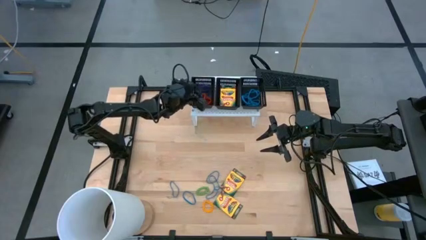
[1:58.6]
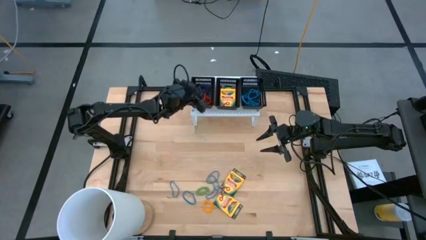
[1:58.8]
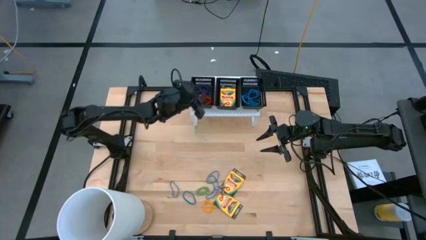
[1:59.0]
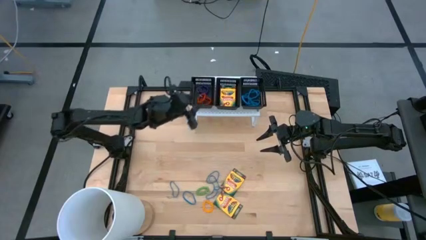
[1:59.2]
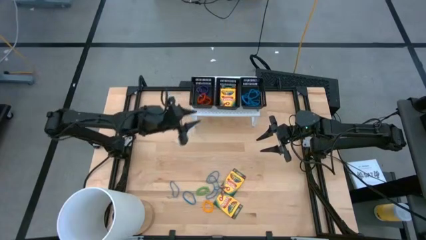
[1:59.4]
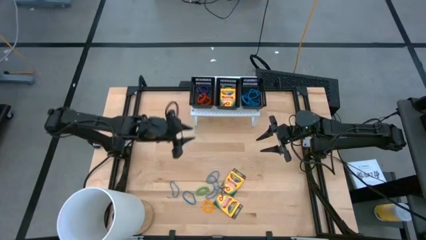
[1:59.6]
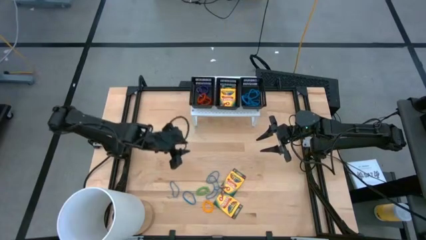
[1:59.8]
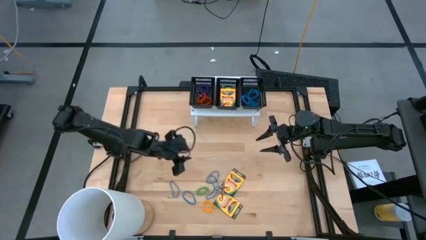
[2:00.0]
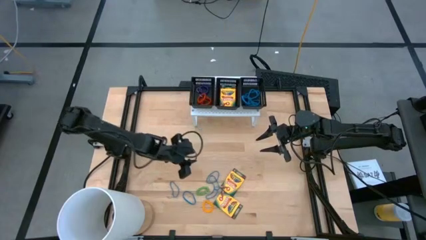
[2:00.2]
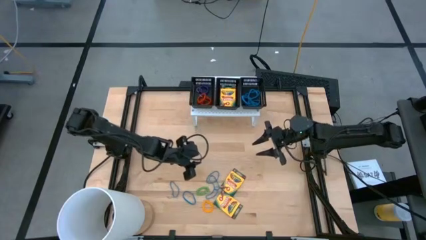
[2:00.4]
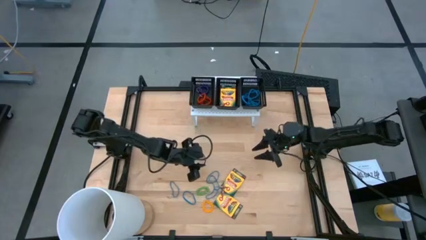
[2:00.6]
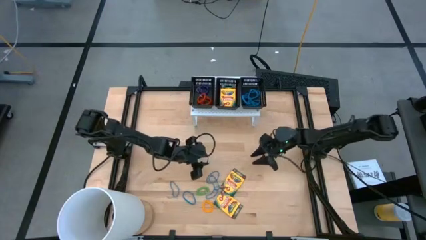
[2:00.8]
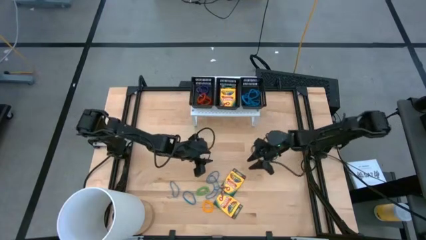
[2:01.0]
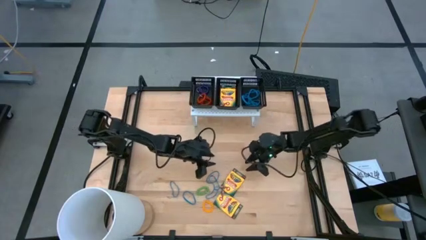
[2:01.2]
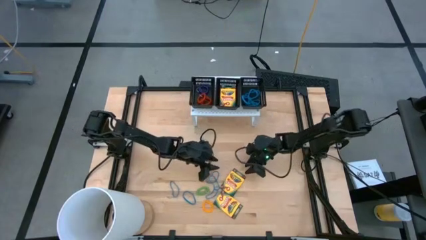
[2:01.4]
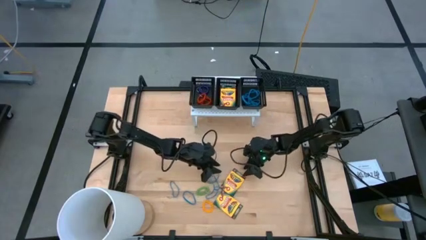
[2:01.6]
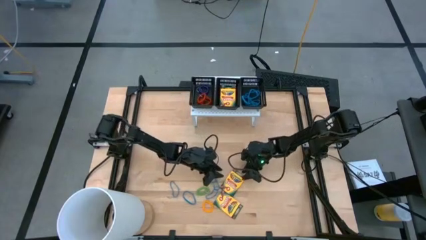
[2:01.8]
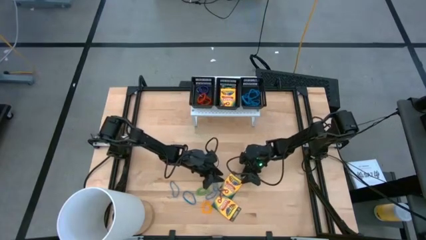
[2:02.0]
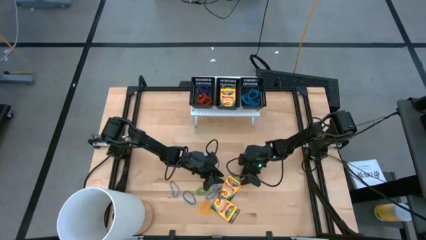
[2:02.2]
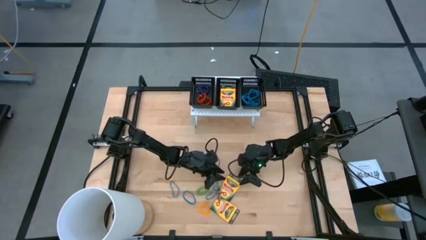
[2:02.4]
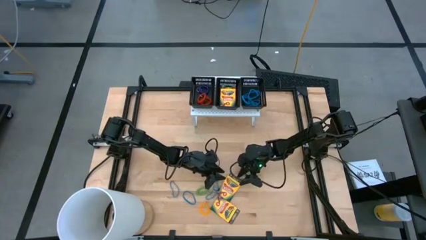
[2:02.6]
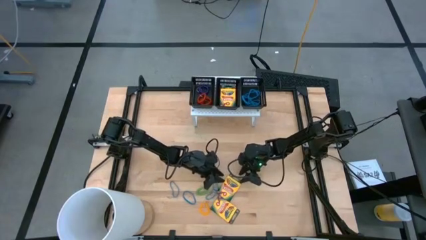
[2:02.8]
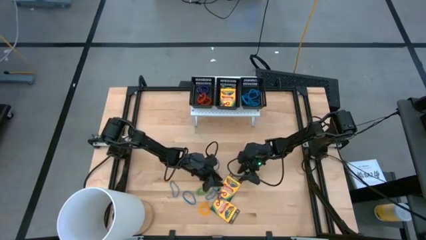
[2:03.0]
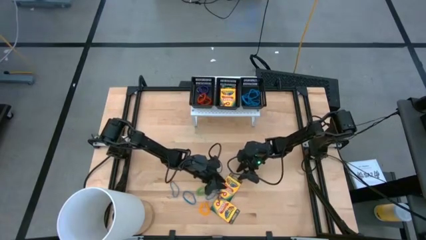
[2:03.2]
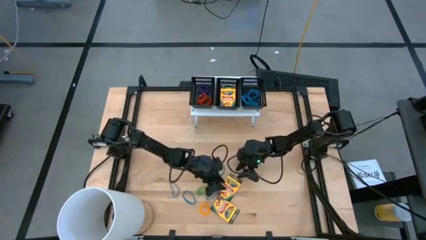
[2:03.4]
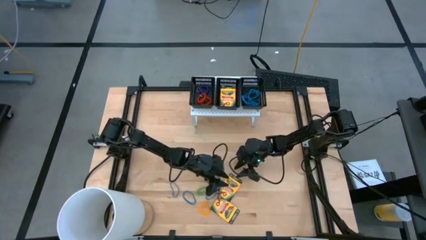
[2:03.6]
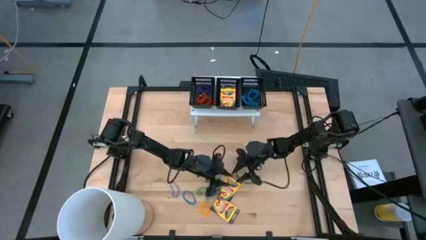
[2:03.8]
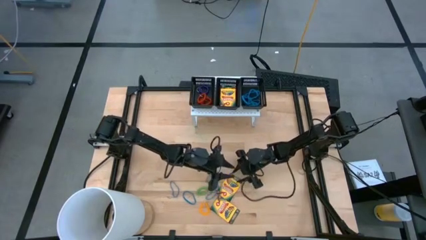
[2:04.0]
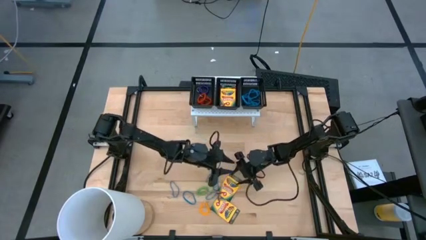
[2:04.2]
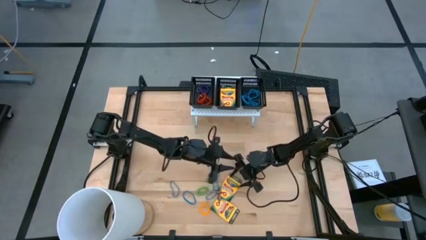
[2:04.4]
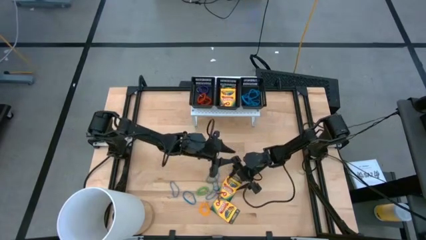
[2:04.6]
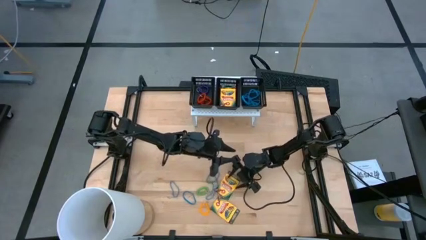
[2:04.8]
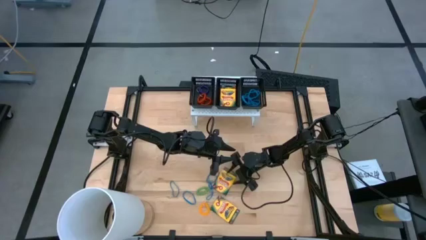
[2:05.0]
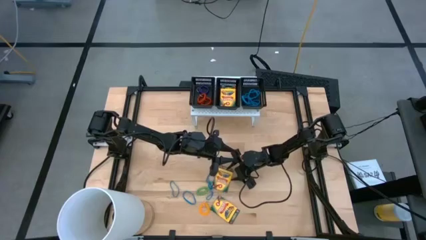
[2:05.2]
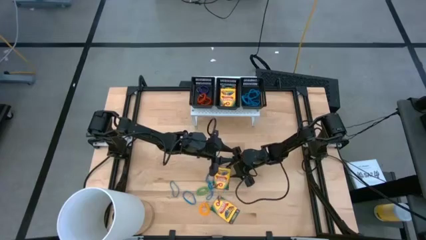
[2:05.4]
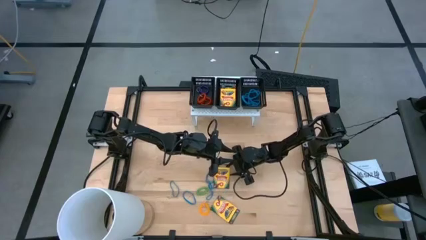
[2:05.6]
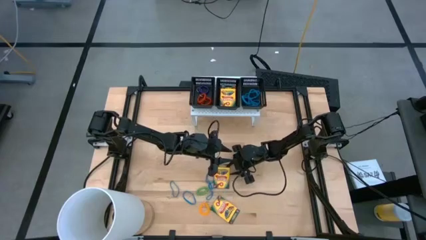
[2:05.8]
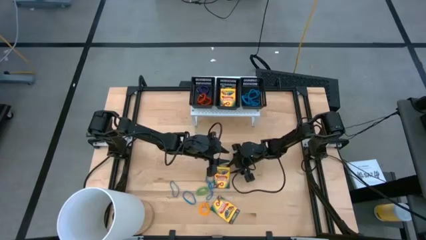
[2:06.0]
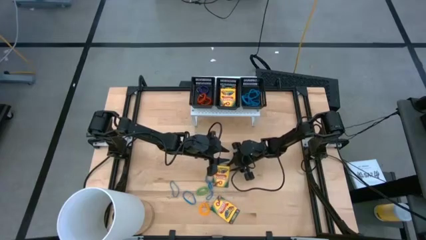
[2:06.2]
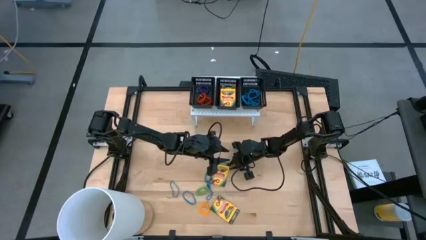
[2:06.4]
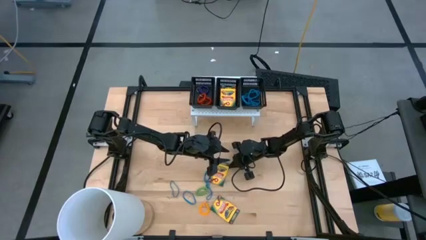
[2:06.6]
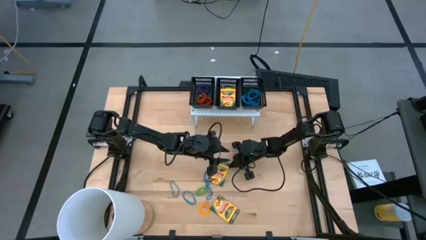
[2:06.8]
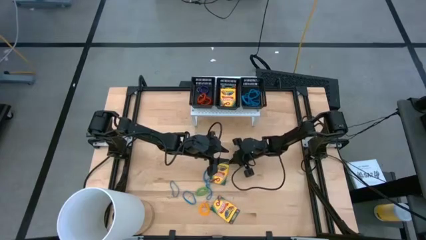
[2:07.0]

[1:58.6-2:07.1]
Task: Pick & Place Office Desk Supplies
Put the crayon box into the middle black bin on the shelf

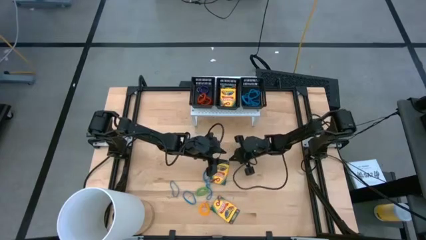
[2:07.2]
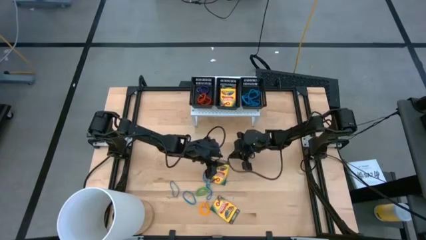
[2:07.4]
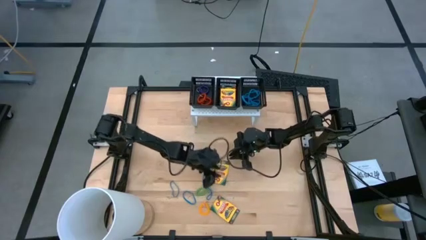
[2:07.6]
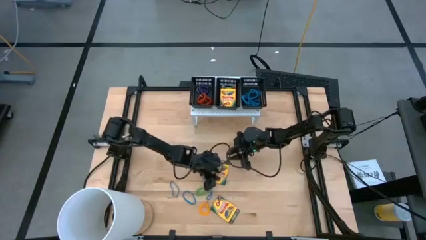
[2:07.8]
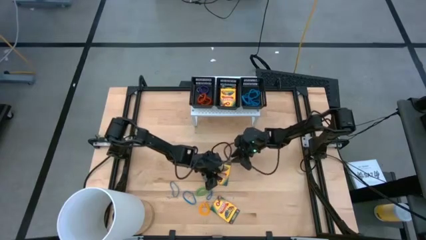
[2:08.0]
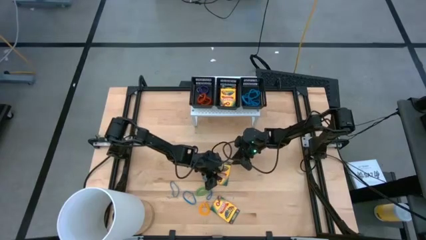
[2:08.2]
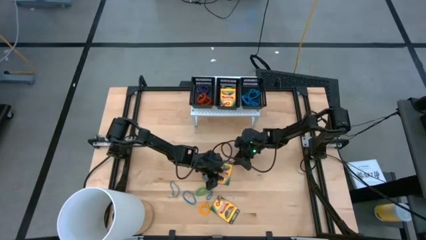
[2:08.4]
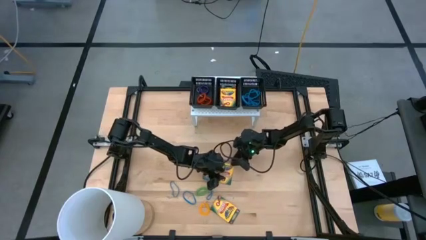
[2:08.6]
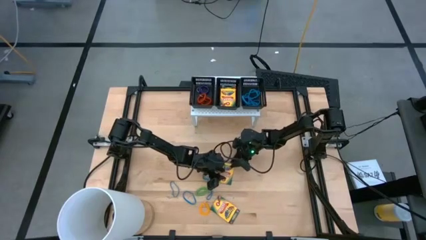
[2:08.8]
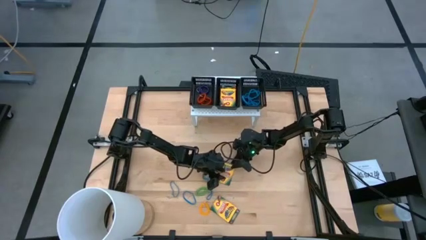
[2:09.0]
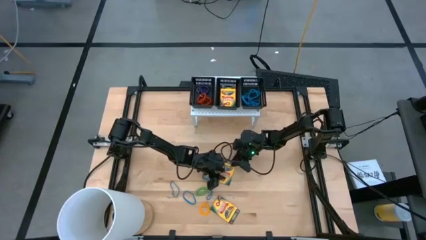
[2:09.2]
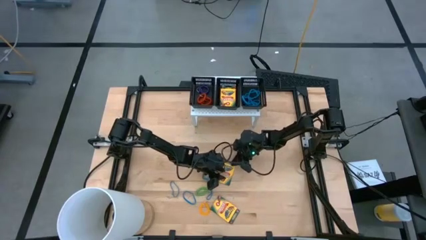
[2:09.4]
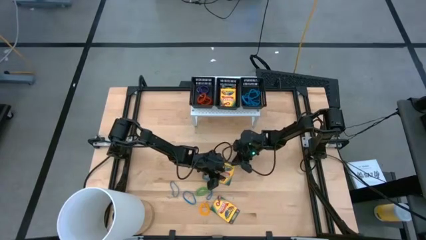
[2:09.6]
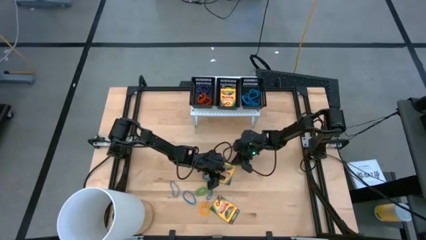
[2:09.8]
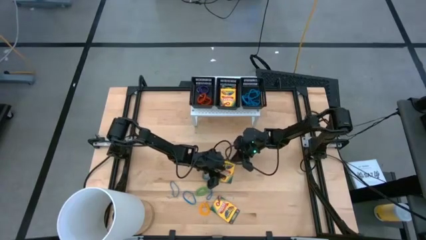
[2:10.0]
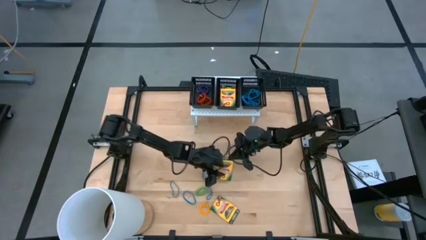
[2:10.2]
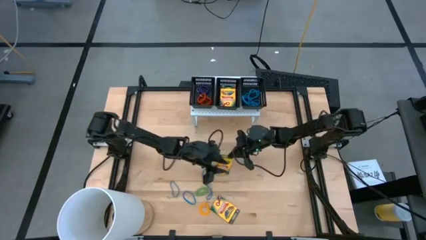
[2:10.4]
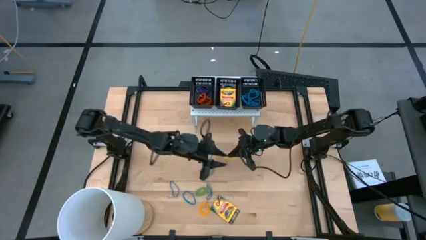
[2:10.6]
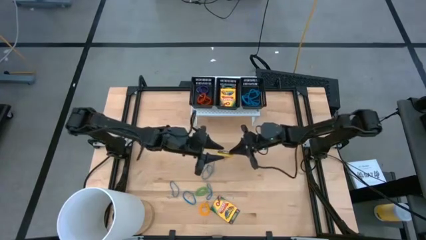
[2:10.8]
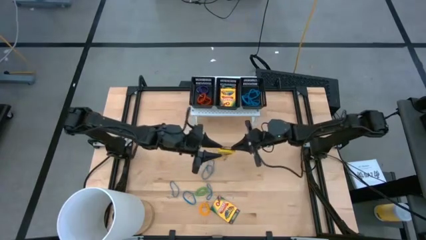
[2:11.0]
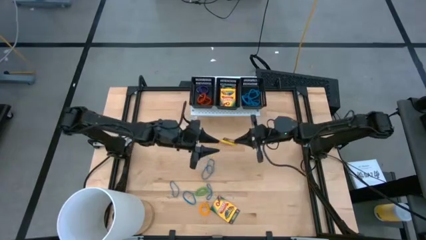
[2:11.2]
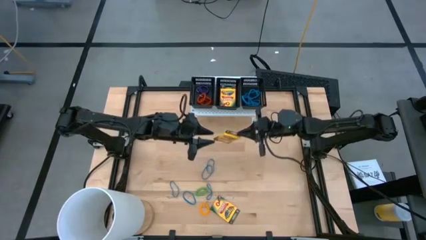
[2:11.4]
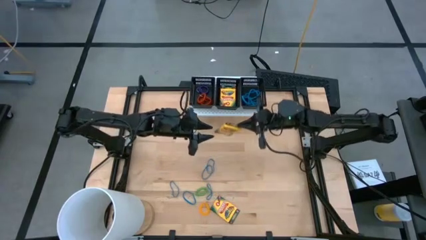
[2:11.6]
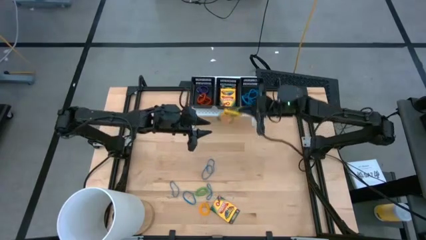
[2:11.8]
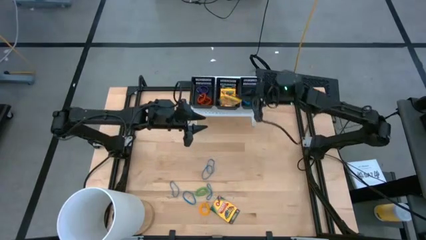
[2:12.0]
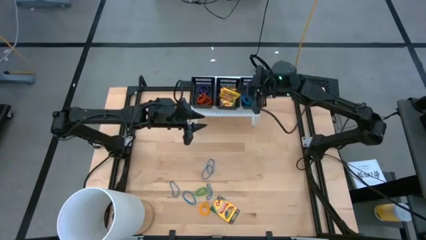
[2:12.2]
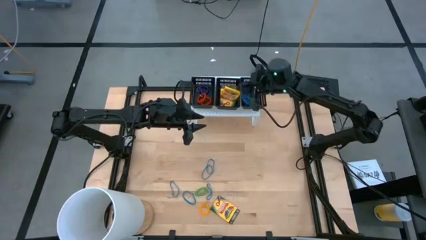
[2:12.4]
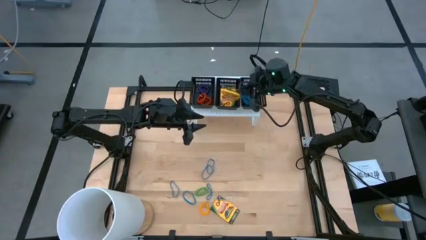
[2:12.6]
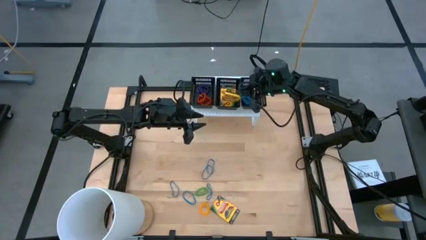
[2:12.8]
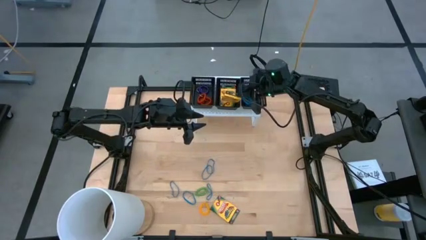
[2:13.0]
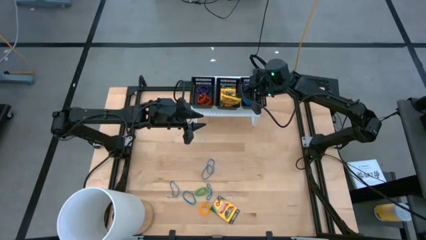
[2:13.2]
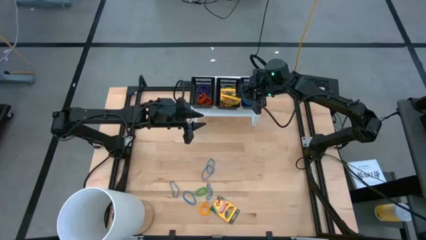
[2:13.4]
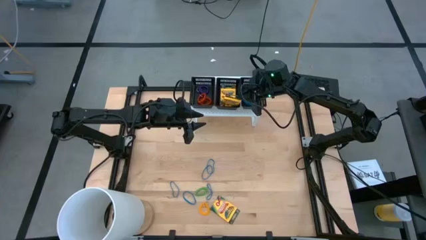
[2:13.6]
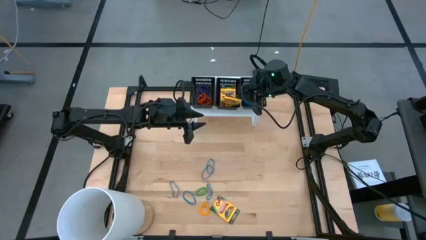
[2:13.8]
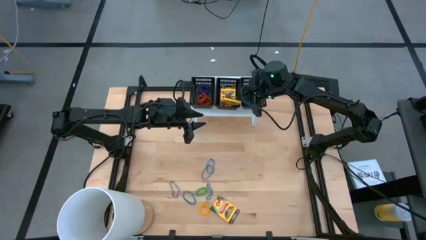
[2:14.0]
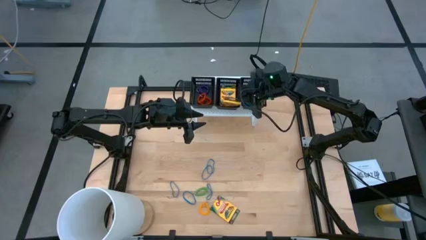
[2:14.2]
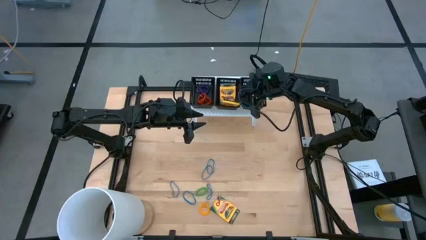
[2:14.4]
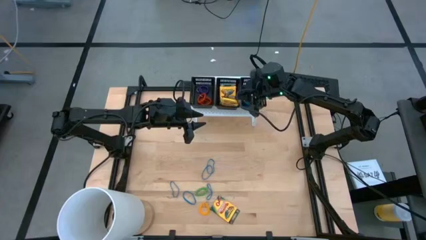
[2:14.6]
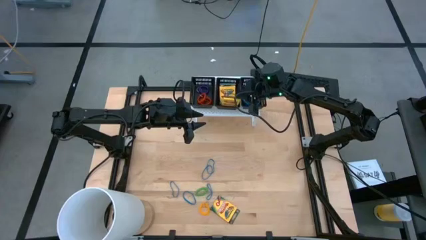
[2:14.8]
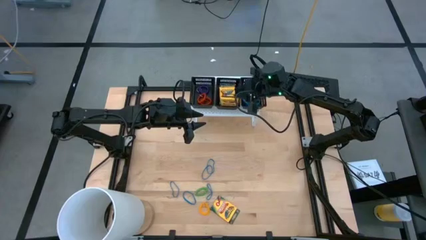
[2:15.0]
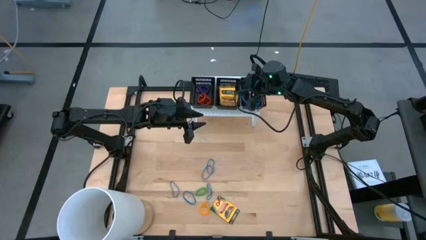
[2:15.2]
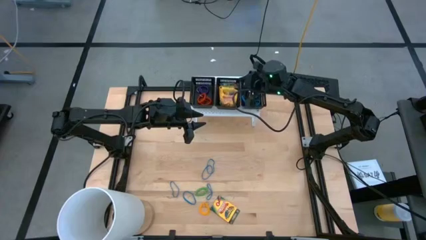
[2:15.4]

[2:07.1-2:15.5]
Put the crayon box into the middle black bin on the shelf
